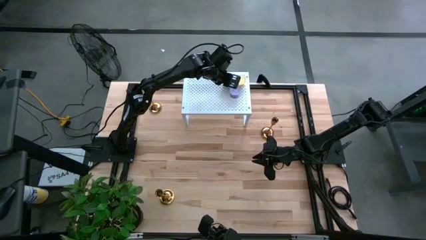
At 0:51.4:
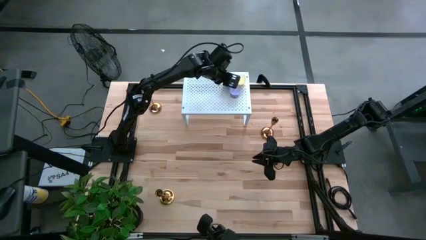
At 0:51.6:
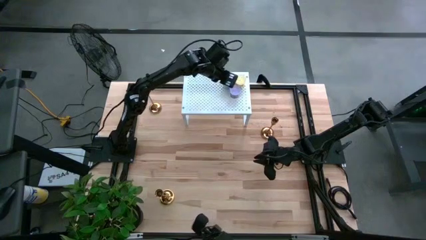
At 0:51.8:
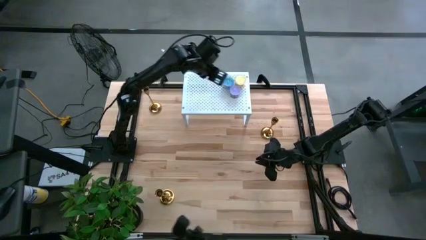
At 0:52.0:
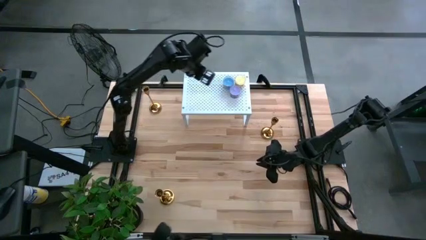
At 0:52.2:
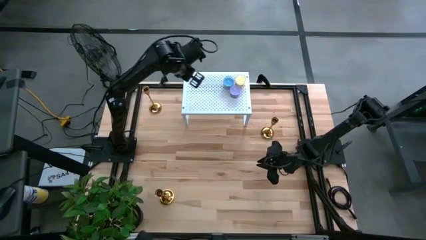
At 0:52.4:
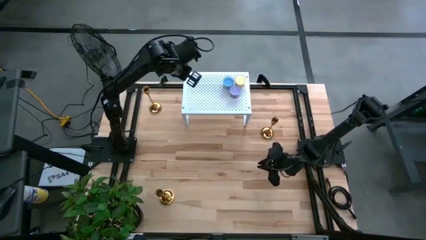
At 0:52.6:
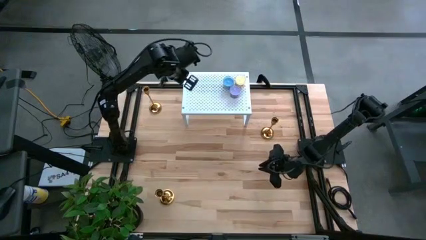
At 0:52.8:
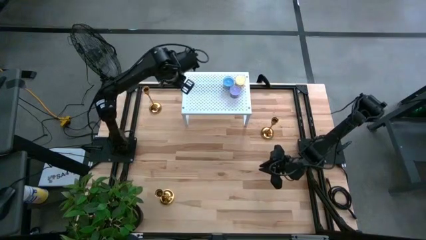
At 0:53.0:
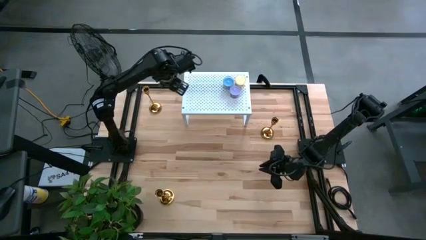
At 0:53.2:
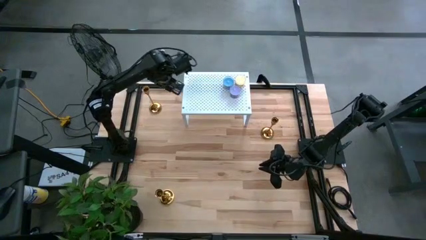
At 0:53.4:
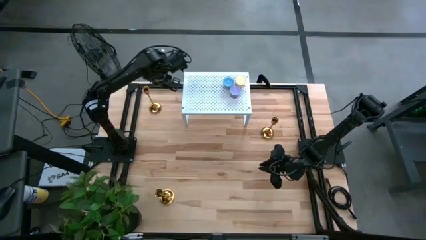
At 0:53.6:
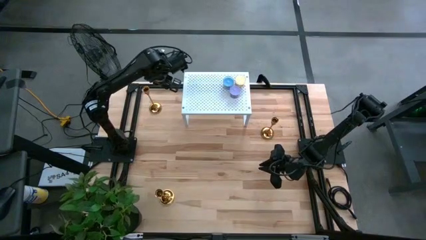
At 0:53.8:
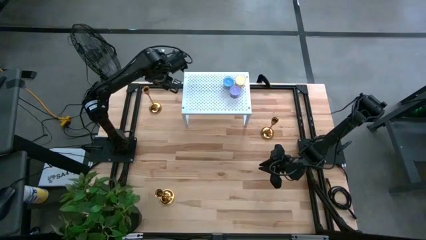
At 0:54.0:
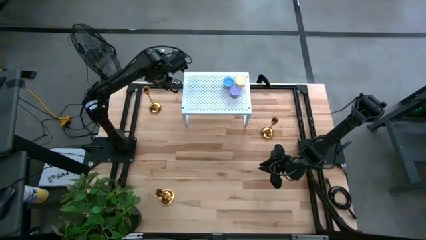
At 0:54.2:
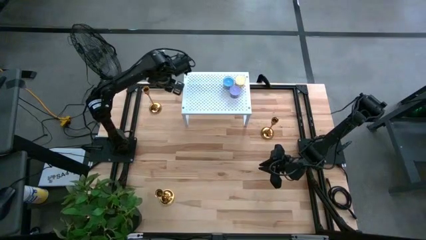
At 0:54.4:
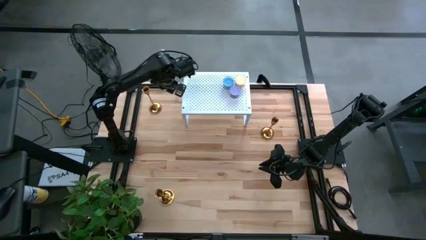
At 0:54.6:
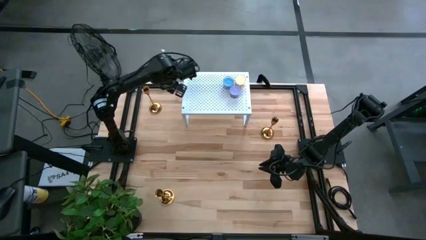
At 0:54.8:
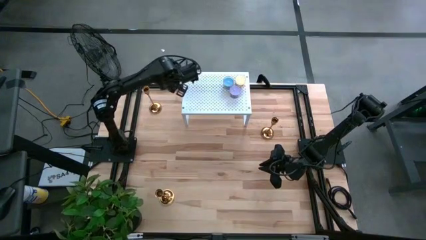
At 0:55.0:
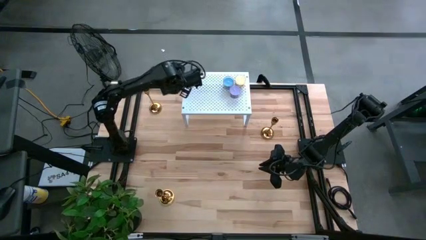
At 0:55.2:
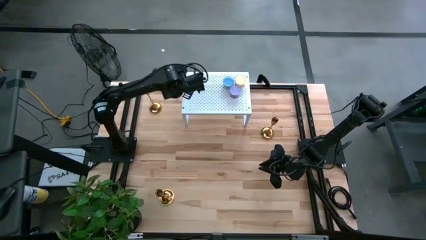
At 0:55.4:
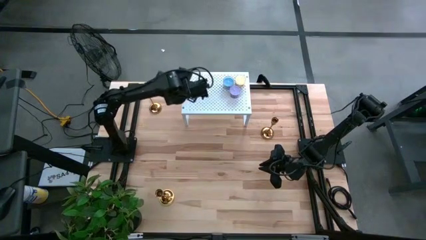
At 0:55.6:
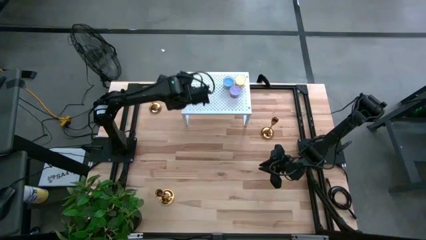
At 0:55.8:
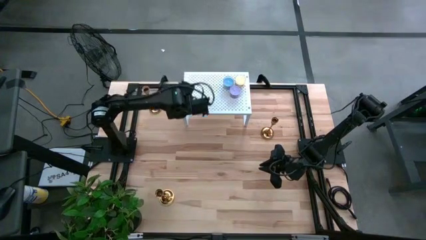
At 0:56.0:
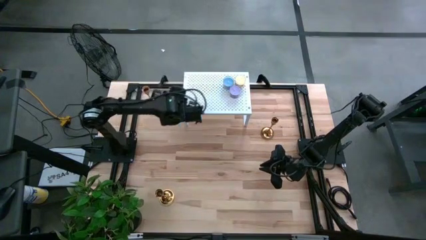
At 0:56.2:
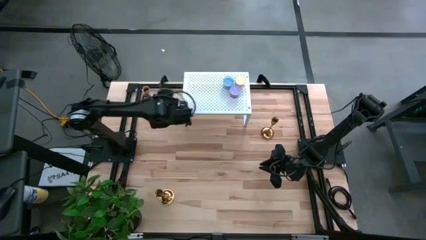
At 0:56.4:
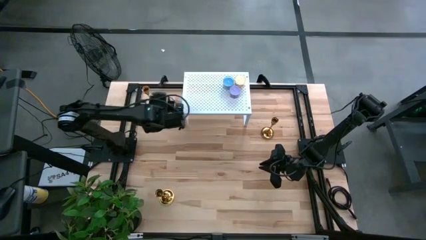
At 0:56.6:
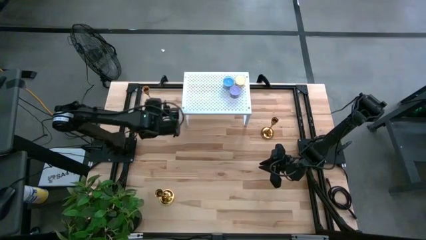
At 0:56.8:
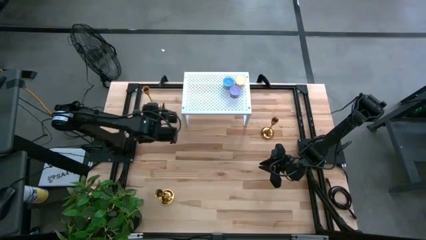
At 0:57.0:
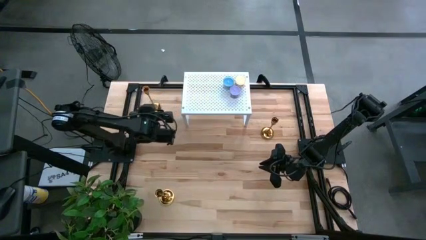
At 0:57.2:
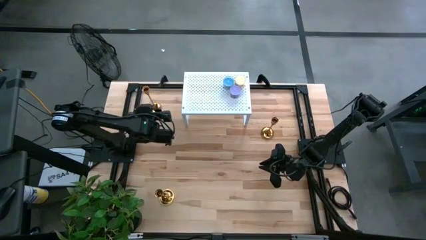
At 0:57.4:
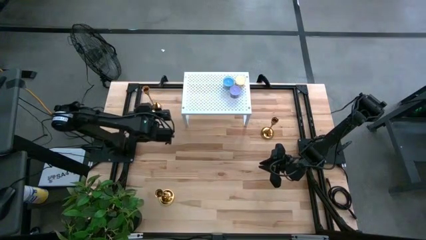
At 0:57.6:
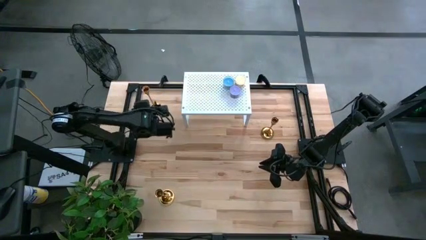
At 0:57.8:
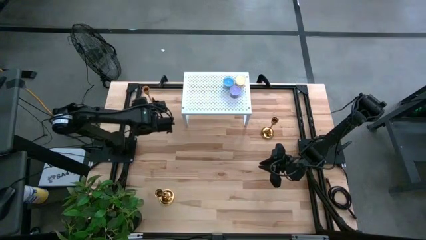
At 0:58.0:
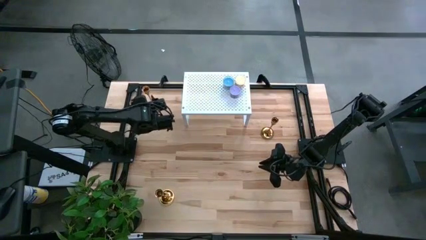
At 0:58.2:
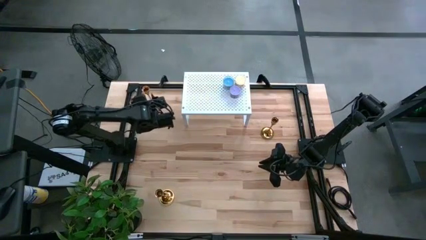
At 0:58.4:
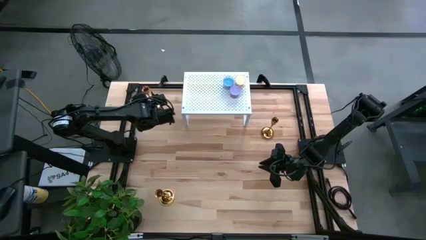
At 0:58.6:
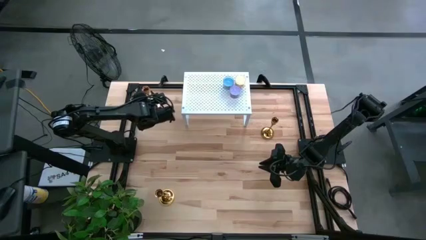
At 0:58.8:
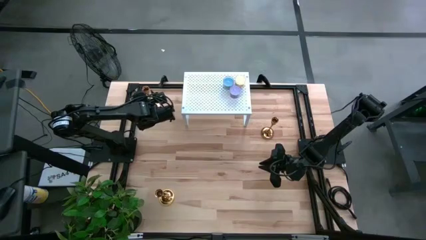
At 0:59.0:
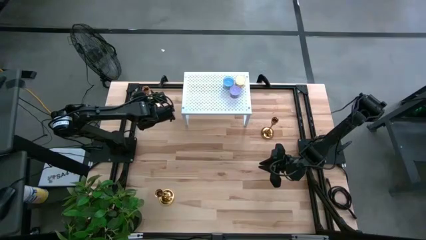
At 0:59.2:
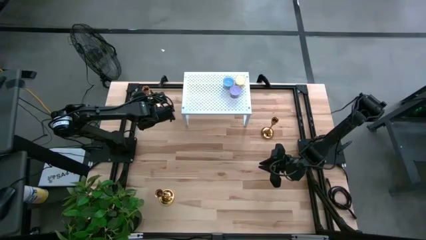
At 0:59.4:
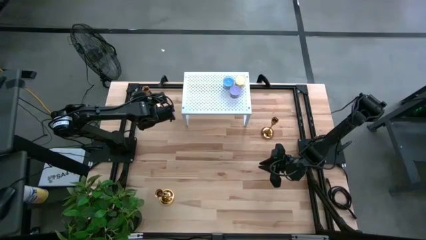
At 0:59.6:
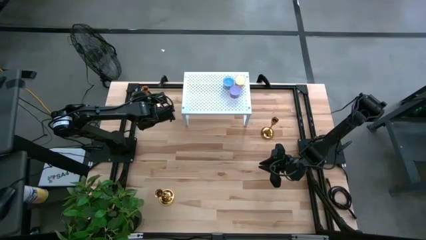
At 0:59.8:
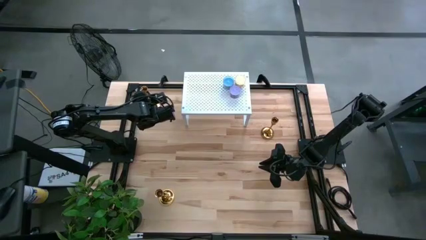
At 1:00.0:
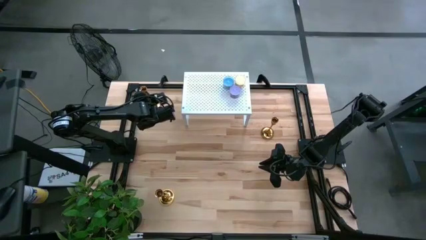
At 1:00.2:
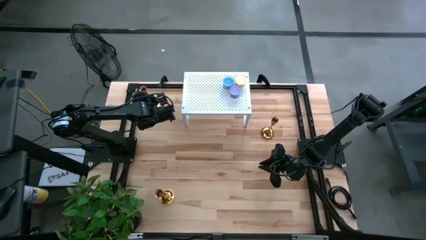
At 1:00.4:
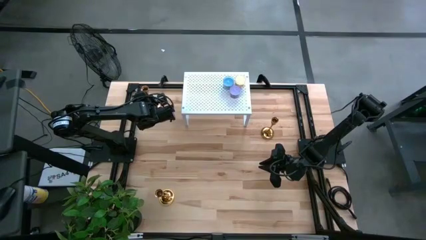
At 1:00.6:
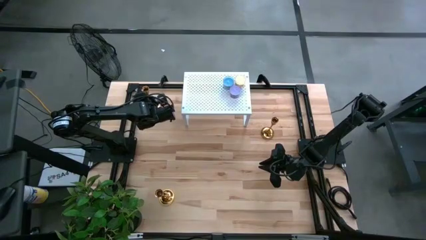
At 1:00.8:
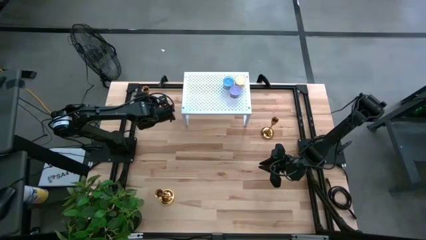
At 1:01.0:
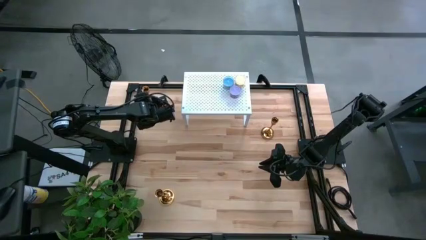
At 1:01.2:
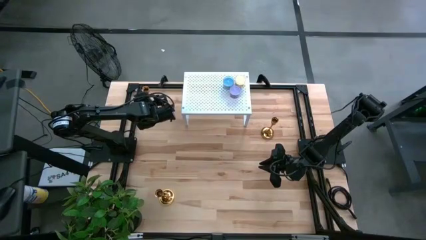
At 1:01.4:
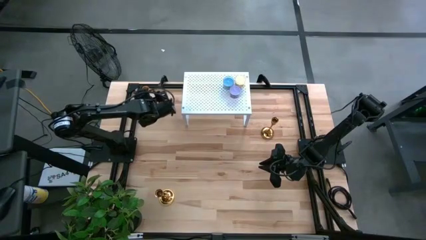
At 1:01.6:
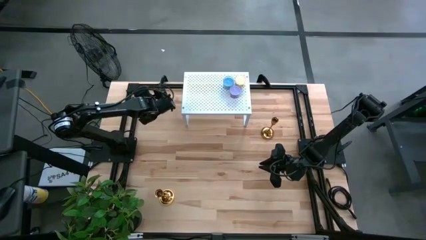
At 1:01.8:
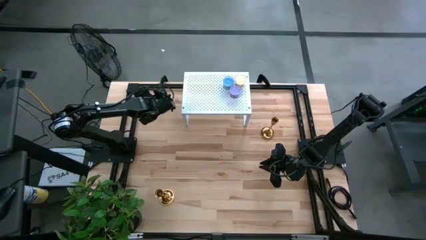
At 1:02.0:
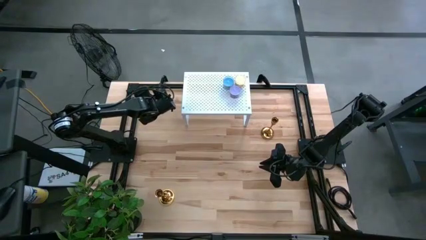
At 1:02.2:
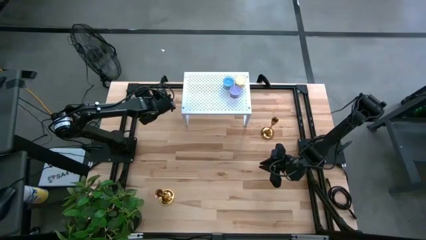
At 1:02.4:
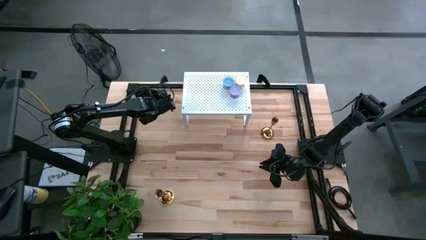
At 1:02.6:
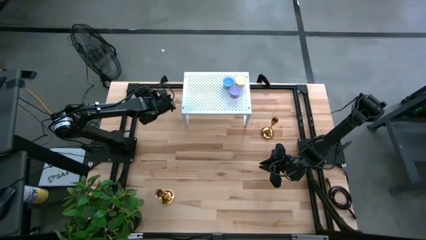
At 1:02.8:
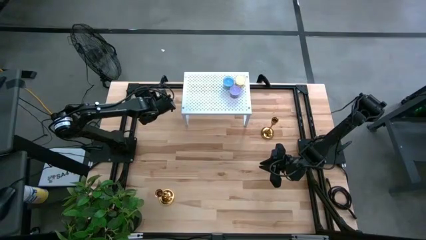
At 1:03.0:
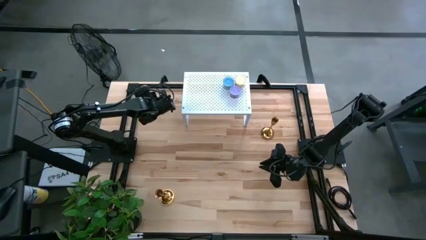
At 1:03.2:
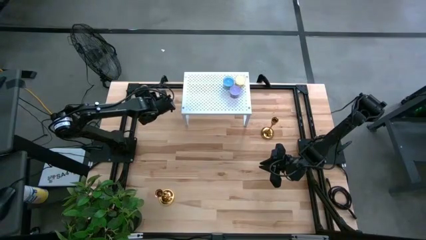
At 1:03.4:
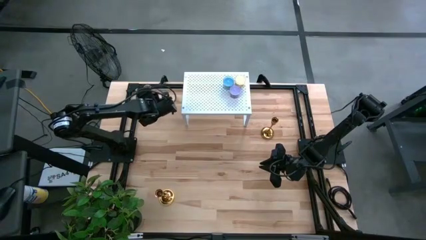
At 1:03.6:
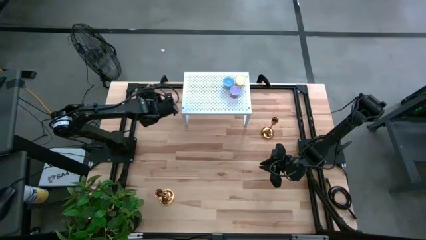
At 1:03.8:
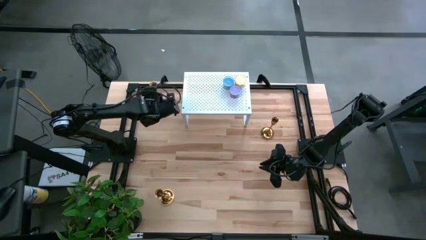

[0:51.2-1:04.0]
Task: Pick & Place candle stick holders
Put the top left candle holder on the shelf

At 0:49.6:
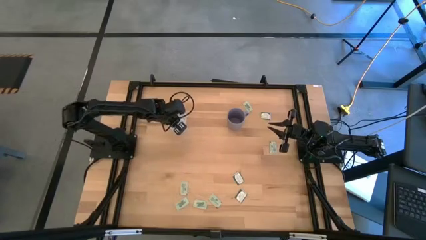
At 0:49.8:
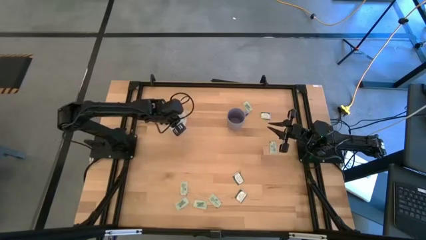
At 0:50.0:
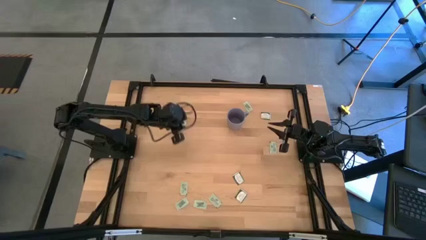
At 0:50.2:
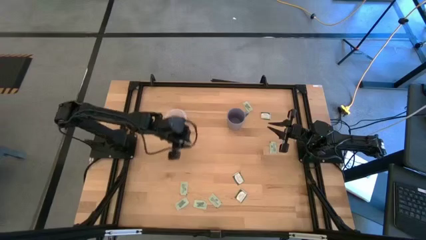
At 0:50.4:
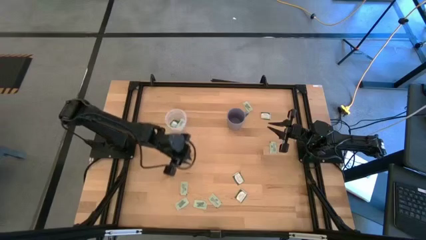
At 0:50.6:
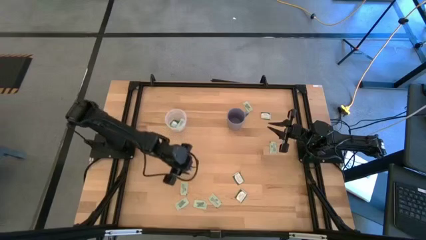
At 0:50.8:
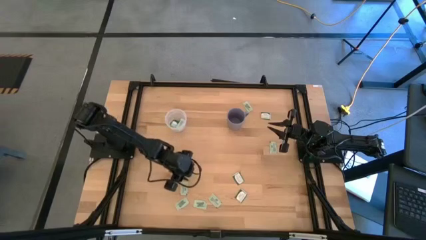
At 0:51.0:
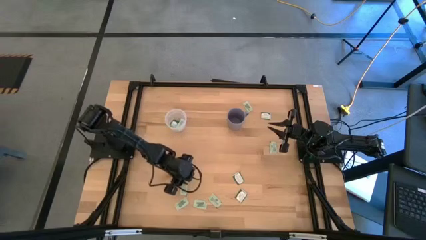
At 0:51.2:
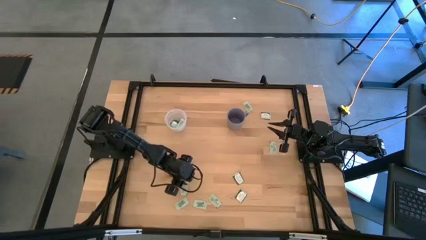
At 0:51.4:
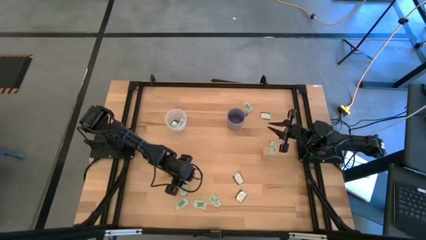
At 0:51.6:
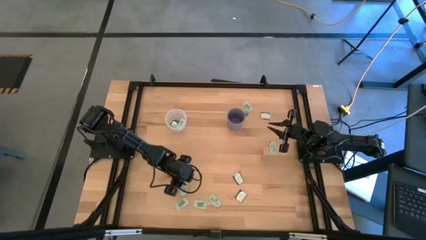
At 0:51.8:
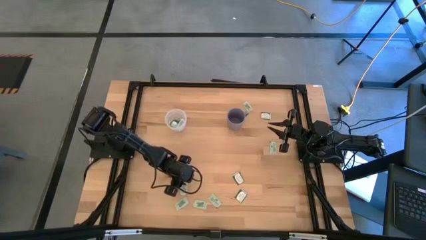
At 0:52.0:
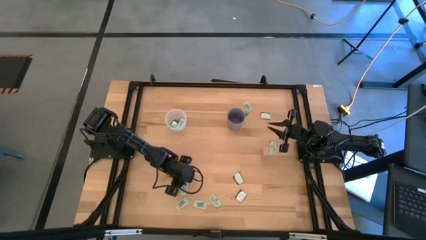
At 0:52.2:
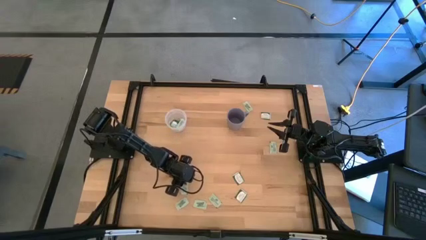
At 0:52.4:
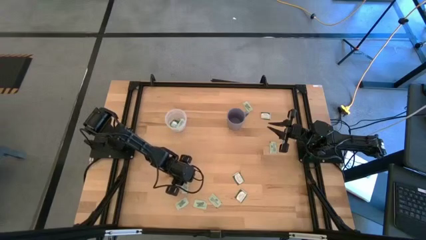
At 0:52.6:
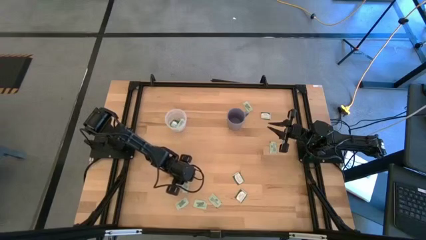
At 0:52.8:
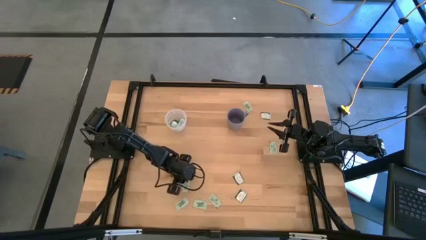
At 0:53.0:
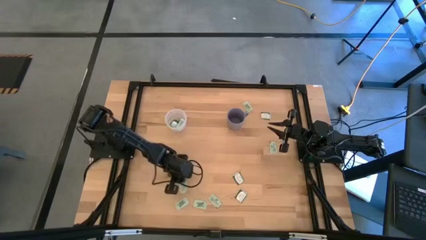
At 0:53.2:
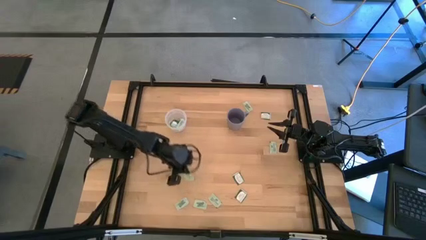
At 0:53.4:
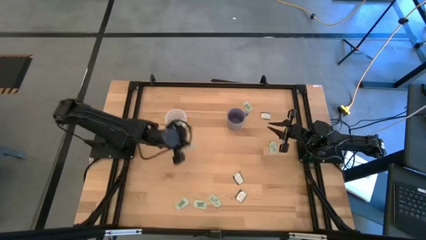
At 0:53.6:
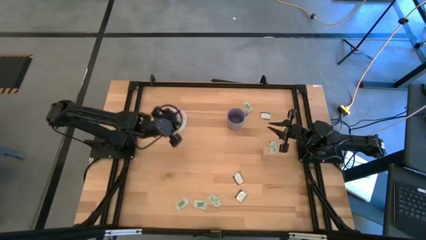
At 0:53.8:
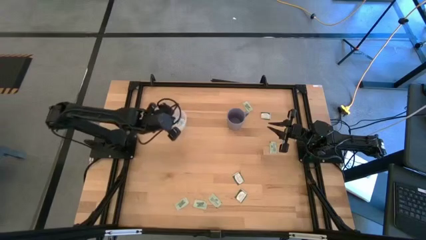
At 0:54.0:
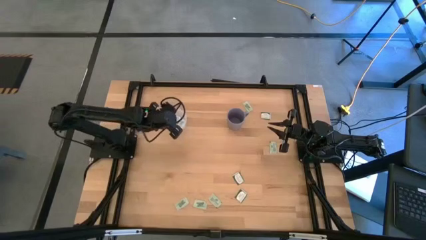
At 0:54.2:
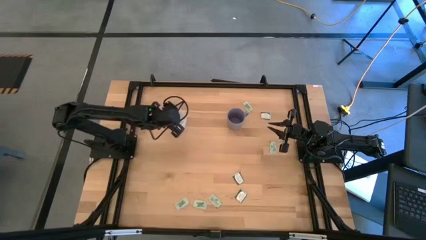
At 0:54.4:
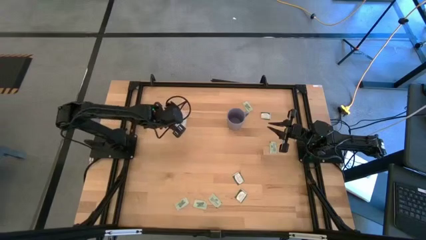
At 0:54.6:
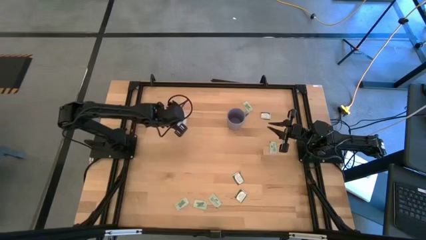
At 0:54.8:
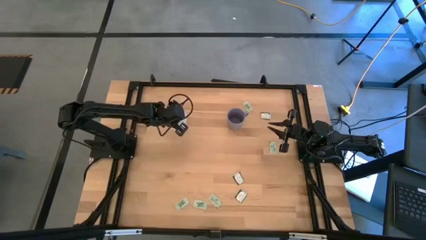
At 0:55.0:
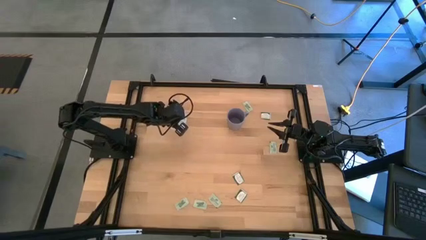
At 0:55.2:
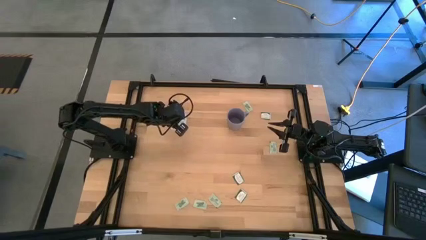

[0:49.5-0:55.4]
Task: Pick and place Stevia / Truvia into bins
Put the light green stevia packet into the transparent container
